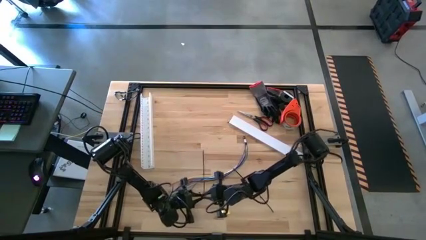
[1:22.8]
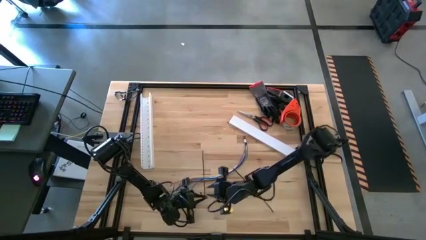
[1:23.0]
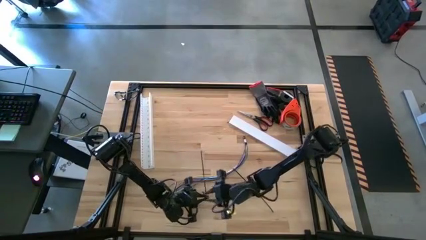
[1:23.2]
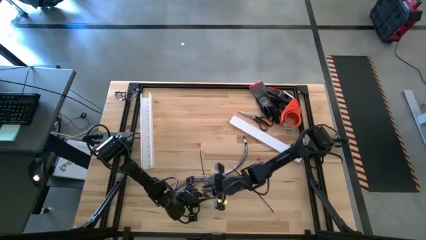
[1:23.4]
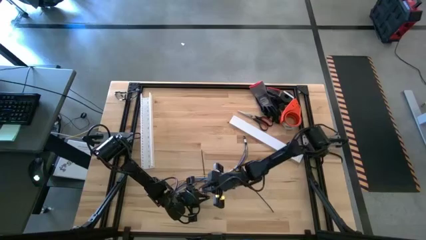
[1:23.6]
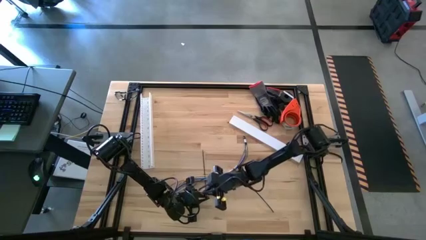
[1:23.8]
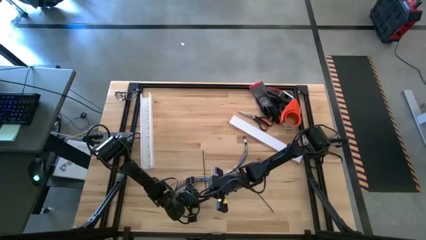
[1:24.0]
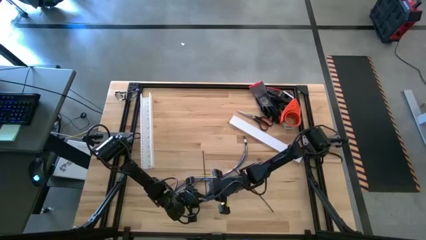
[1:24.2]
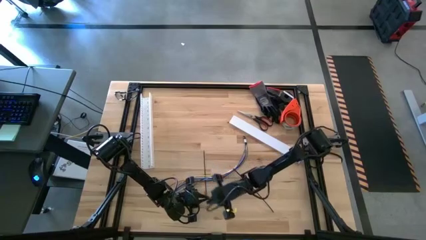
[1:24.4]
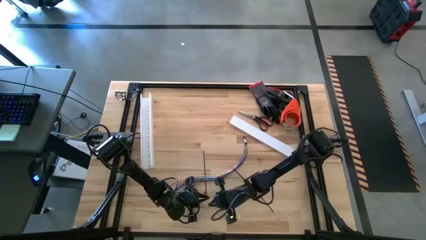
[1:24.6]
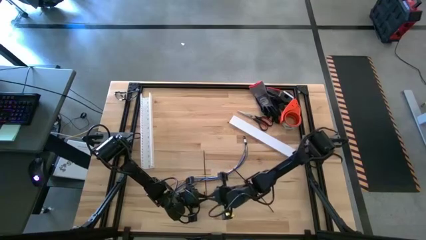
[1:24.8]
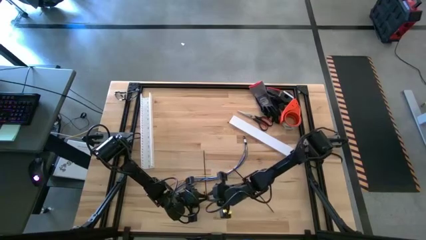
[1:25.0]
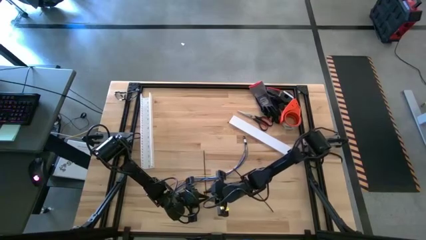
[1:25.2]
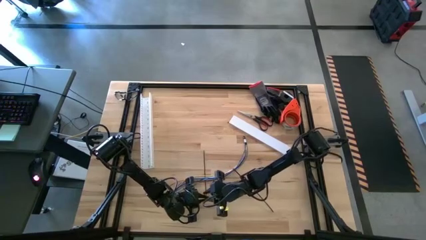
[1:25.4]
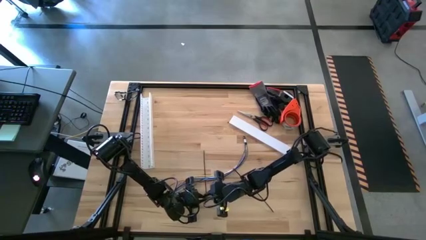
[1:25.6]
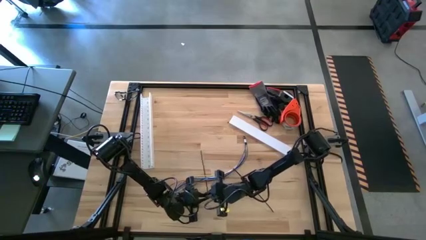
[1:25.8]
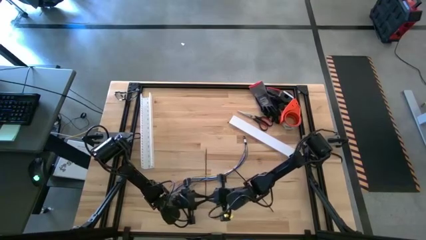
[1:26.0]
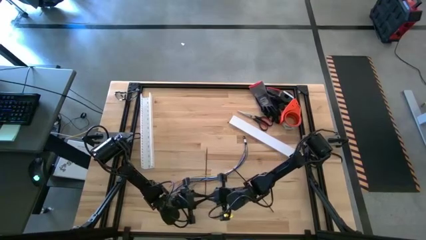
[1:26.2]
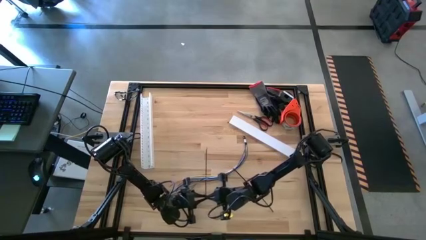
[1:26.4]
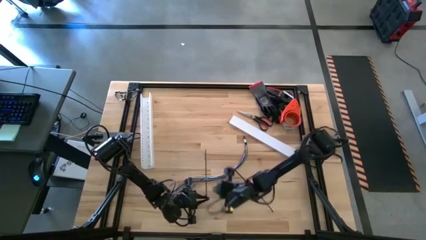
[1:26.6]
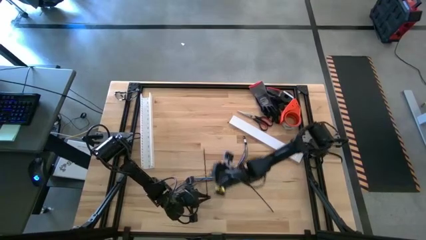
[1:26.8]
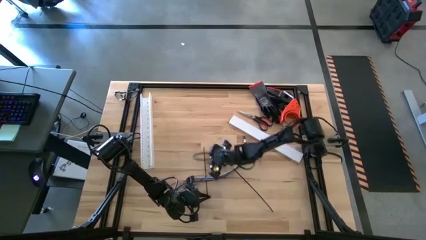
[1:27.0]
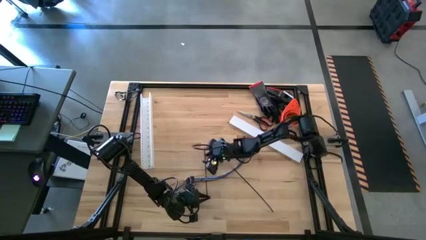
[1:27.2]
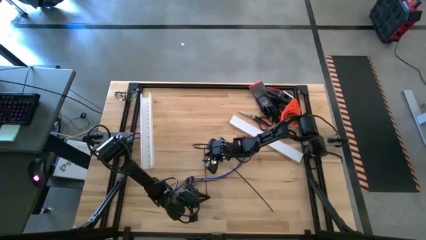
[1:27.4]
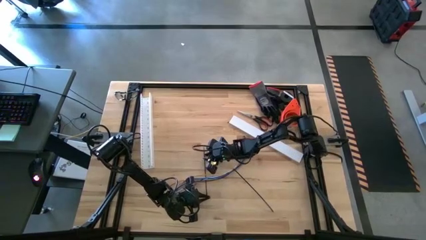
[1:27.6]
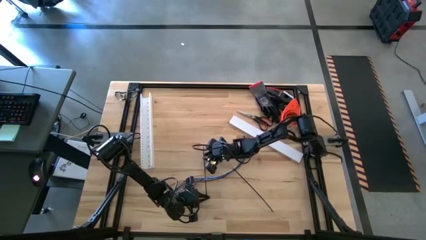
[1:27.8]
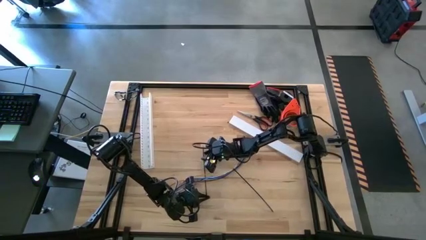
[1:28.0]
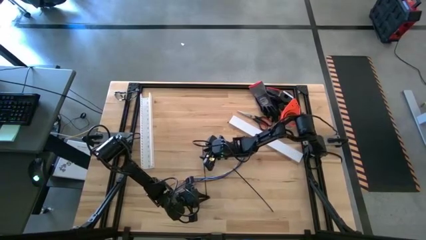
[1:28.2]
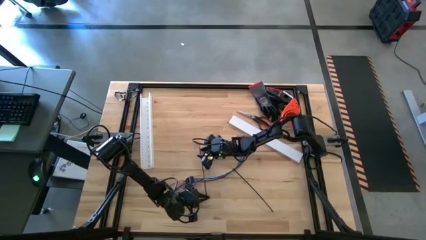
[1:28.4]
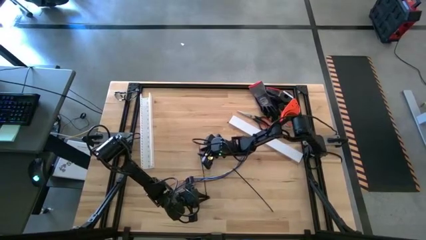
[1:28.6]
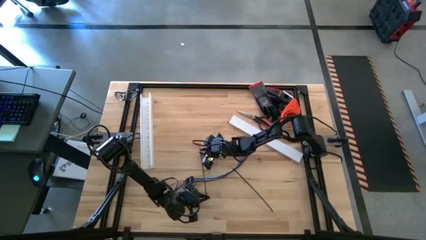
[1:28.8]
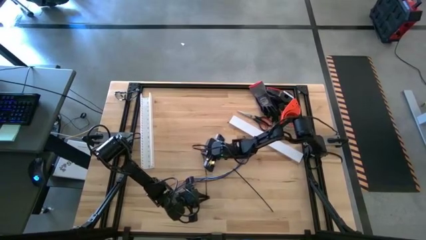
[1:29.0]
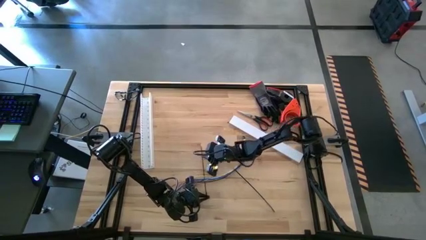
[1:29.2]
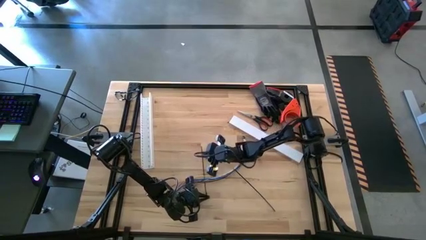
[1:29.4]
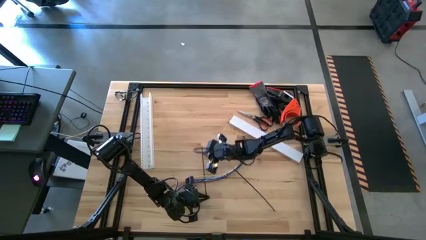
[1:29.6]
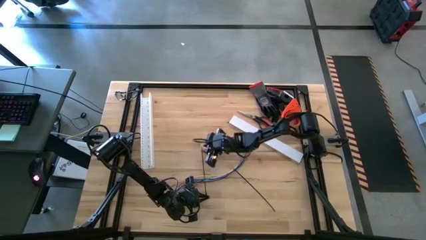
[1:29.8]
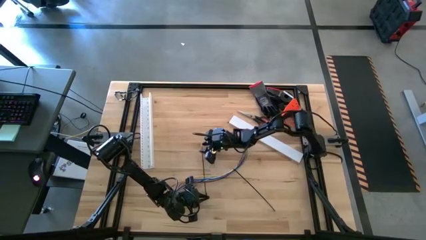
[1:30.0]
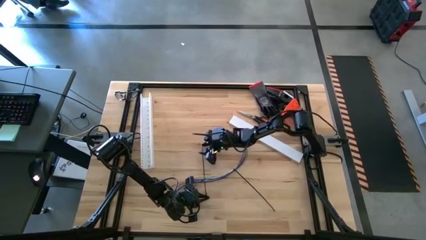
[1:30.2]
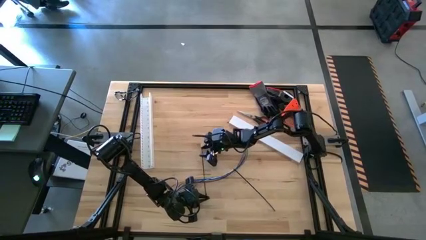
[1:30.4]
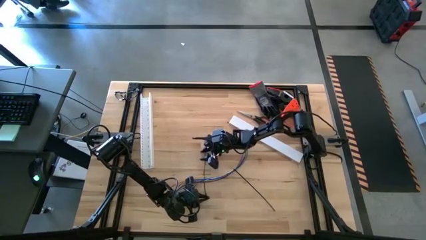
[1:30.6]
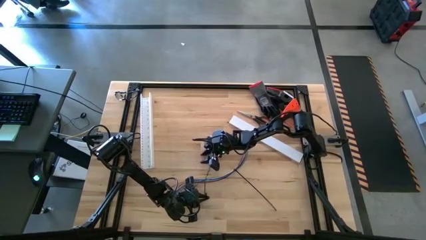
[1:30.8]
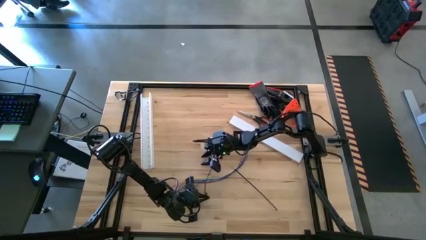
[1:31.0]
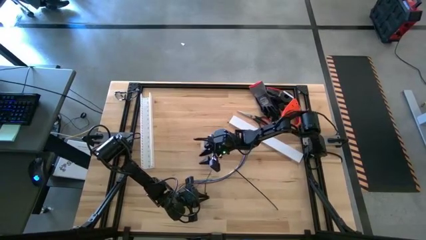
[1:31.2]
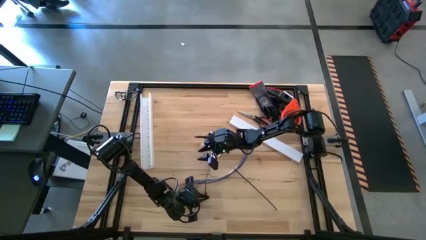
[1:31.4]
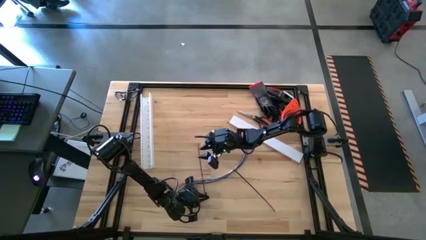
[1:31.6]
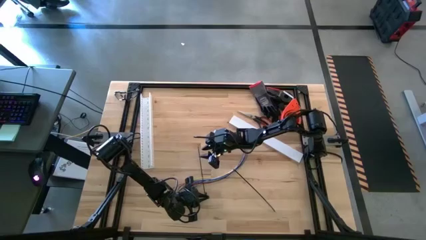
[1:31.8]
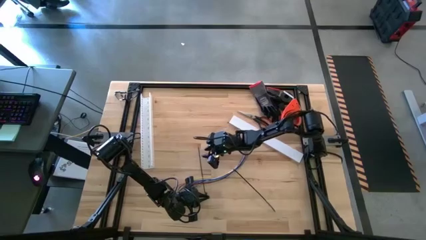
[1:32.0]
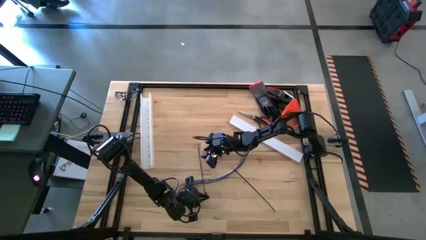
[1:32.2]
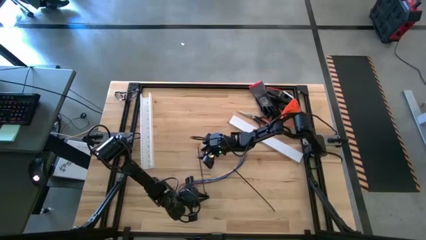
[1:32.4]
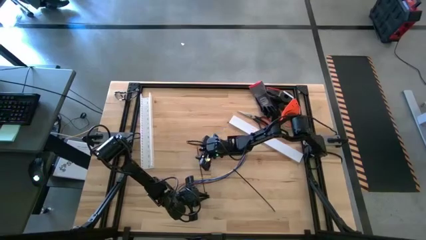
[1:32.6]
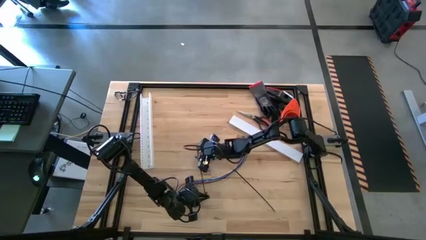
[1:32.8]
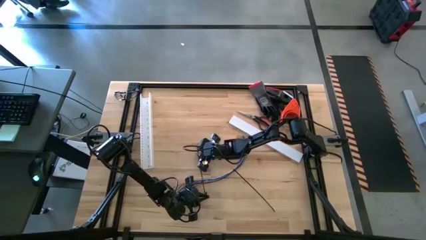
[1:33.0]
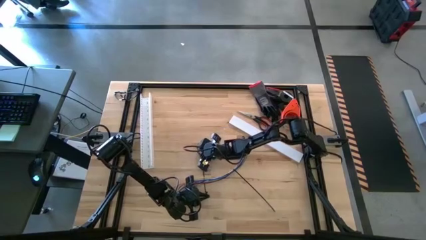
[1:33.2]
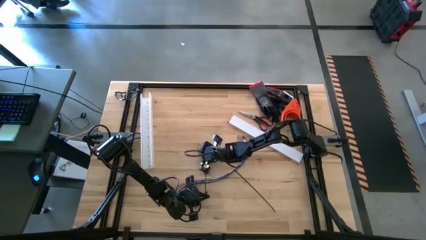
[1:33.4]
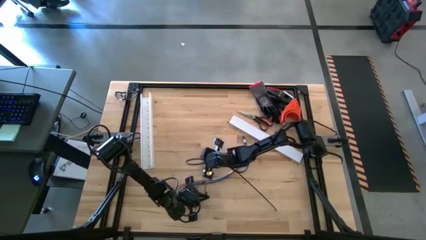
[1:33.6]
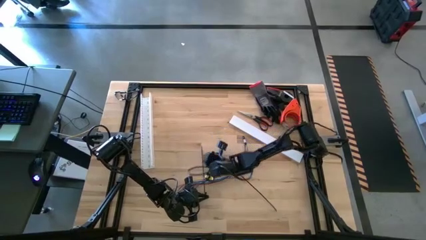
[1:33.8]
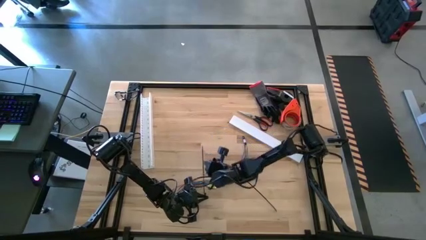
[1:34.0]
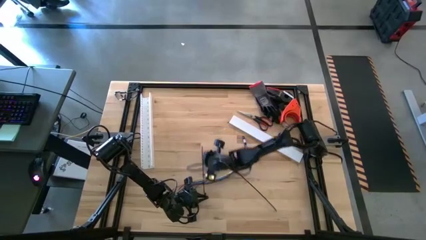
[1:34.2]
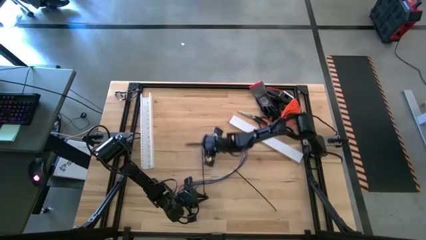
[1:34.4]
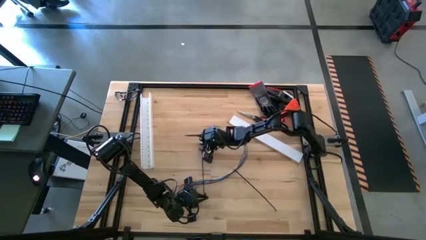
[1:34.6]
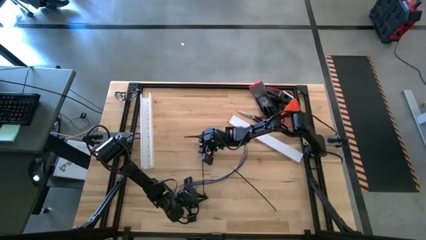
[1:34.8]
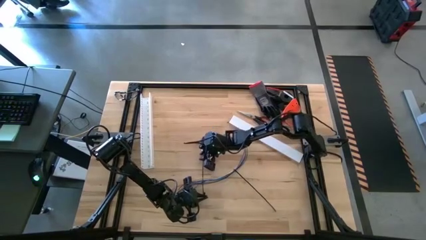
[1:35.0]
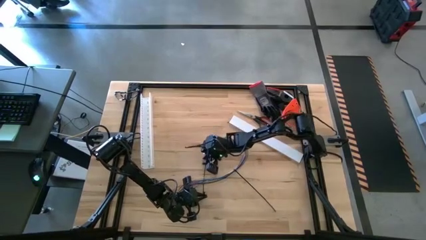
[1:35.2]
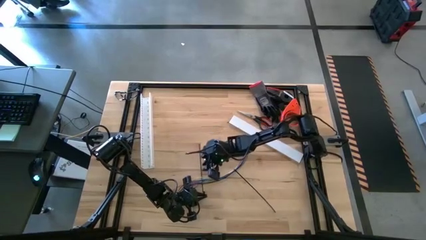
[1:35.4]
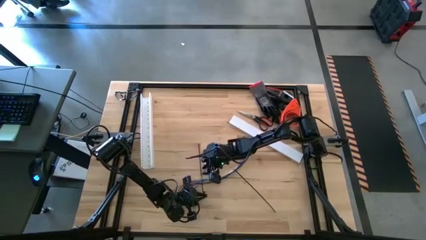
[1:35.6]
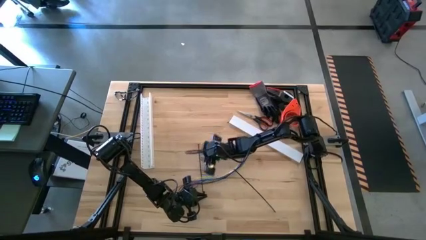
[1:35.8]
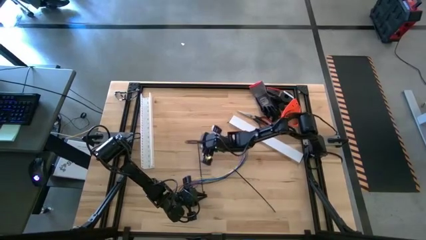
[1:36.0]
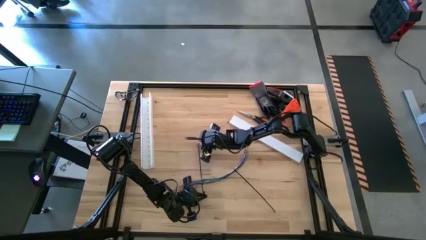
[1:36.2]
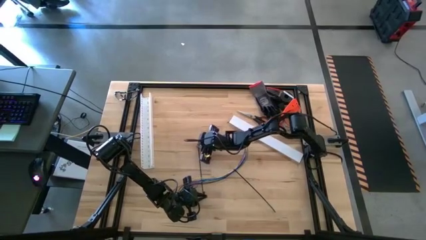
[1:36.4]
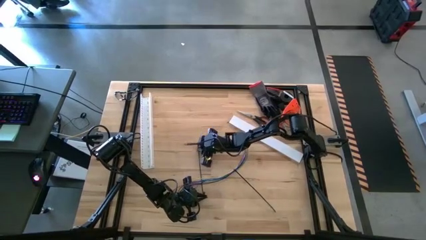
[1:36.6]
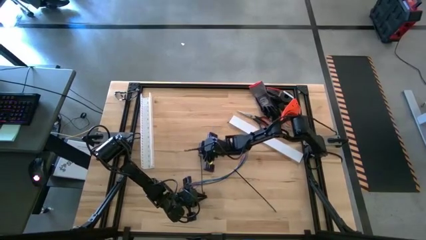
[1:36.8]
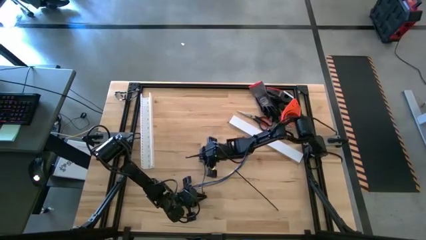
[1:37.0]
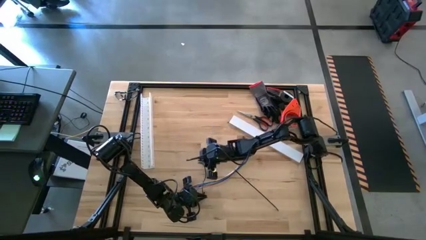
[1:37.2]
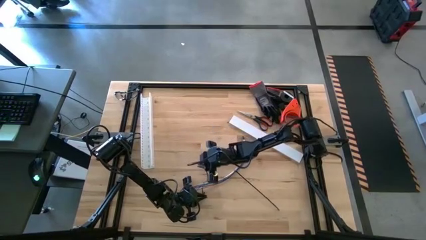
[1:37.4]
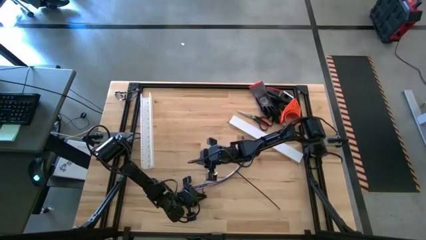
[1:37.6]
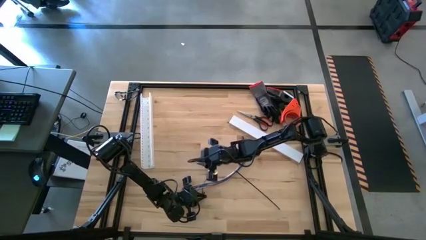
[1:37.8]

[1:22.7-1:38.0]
Task: Ziptie cables
Wrap the zip tie on the cable
